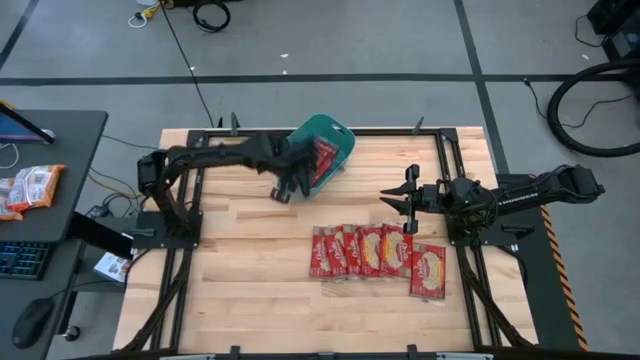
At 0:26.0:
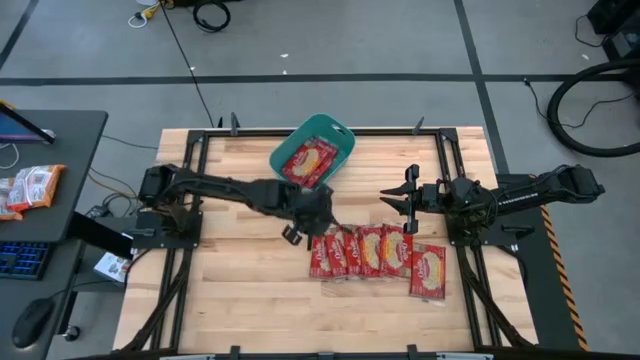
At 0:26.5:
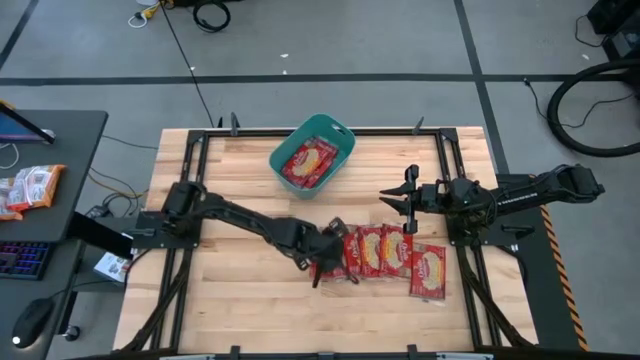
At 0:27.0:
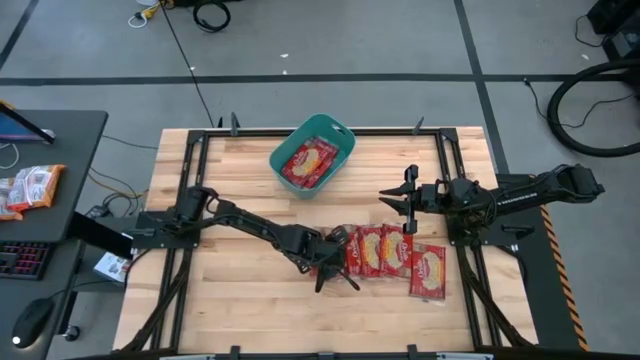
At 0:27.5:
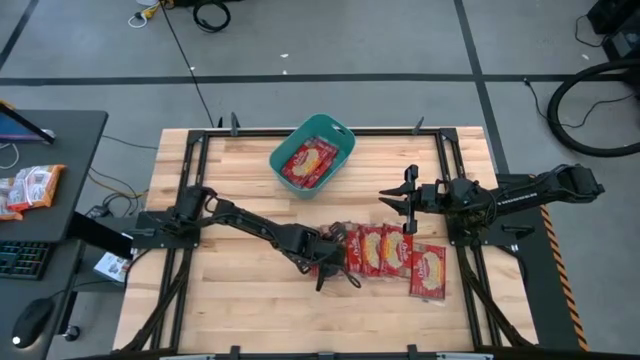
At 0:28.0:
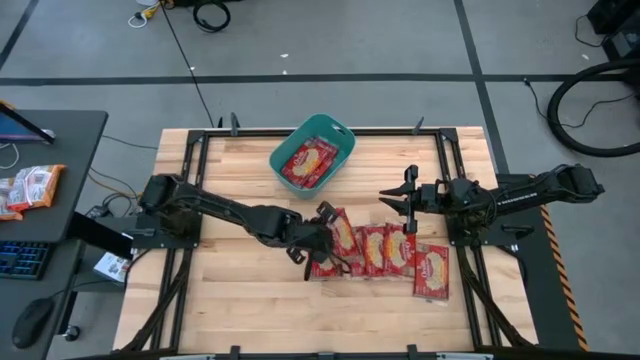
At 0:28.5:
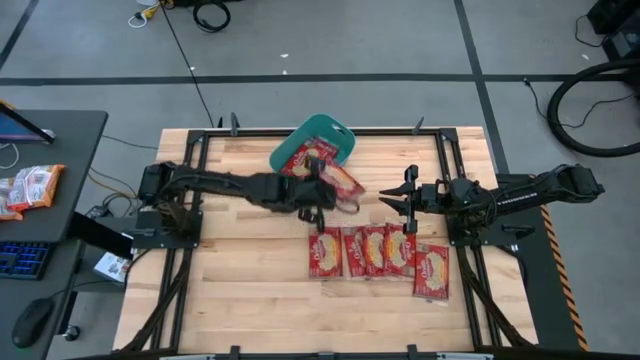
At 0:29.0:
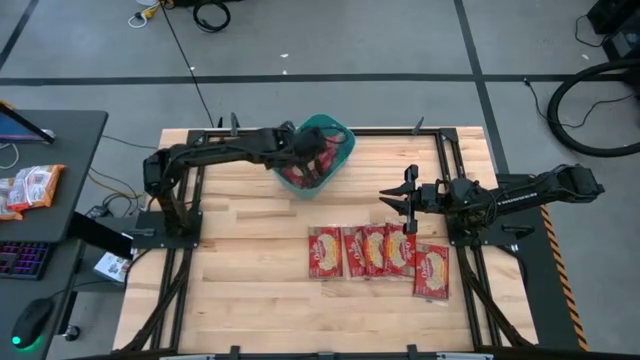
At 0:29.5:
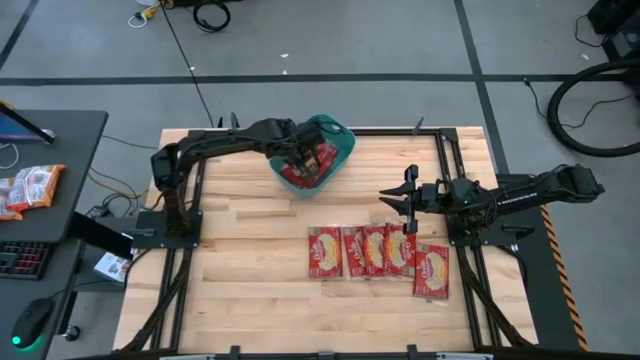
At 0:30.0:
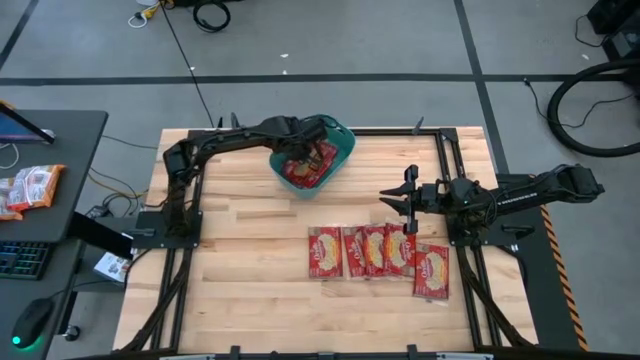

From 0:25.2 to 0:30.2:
Task: Sort popcorn bags into baskets
Put the popcorn bag into the green bin

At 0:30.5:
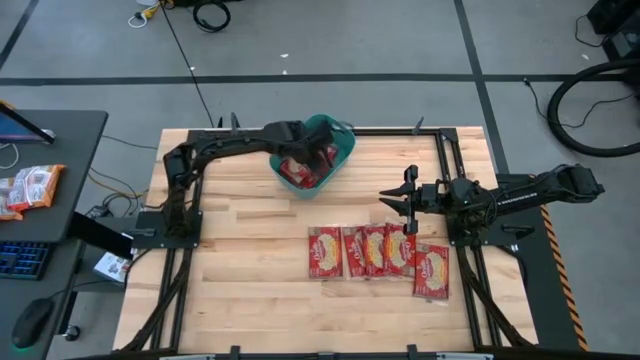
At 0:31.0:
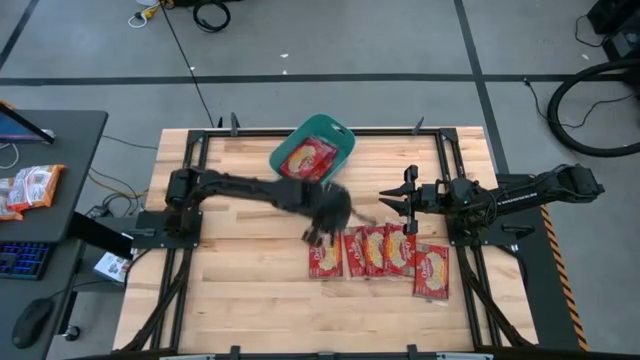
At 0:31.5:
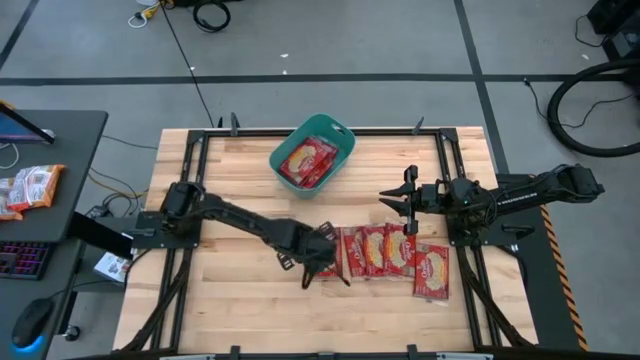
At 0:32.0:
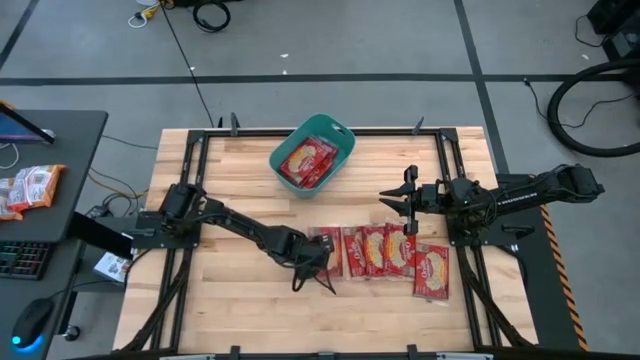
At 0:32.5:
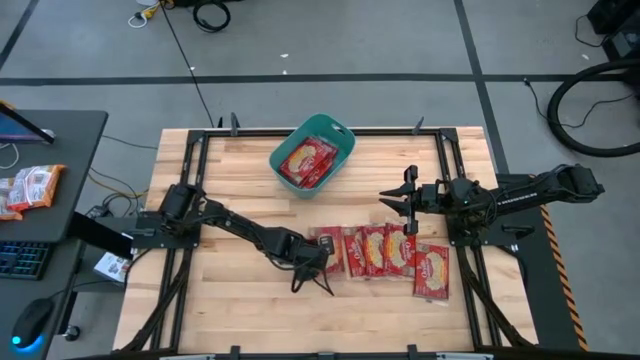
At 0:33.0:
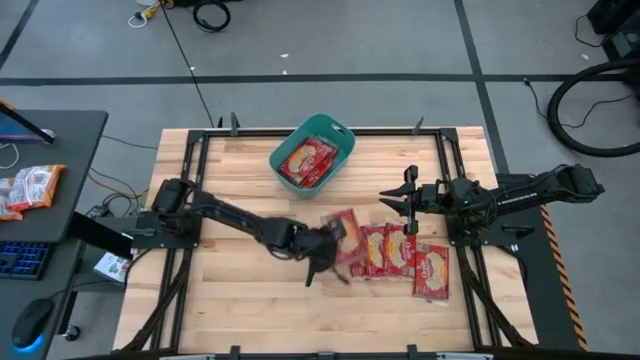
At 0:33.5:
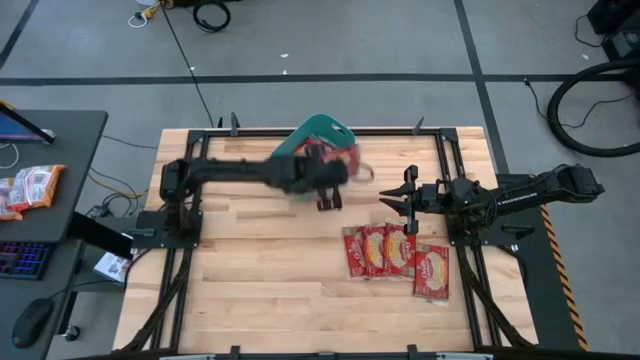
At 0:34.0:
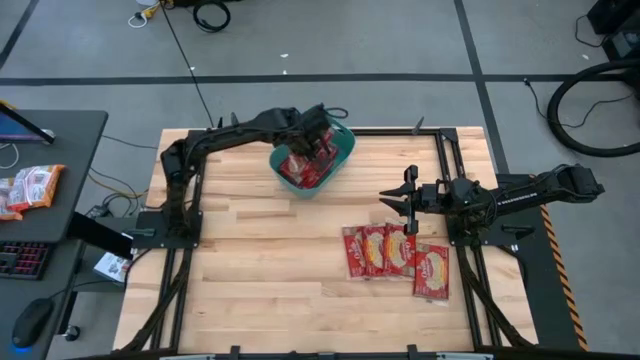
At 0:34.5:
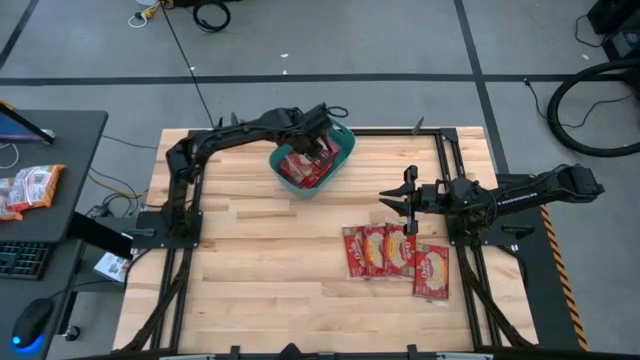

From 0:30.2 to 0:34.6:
Put the popcorn bag into the green bin

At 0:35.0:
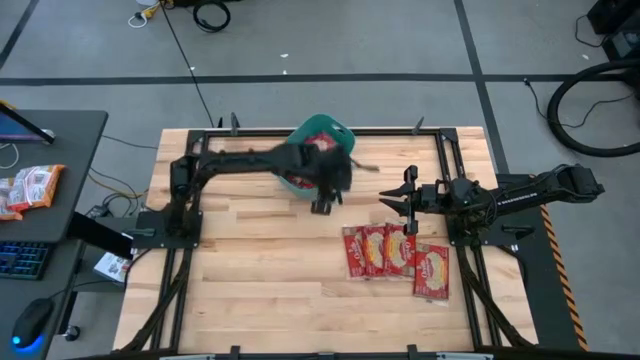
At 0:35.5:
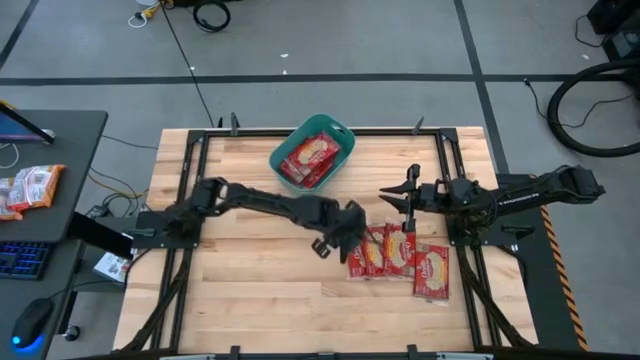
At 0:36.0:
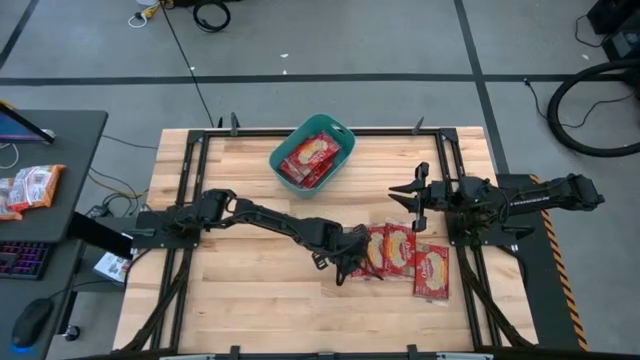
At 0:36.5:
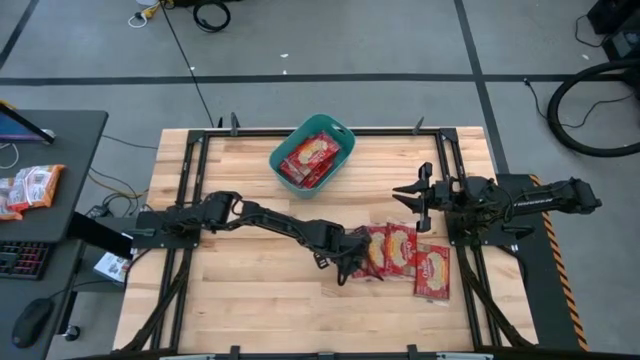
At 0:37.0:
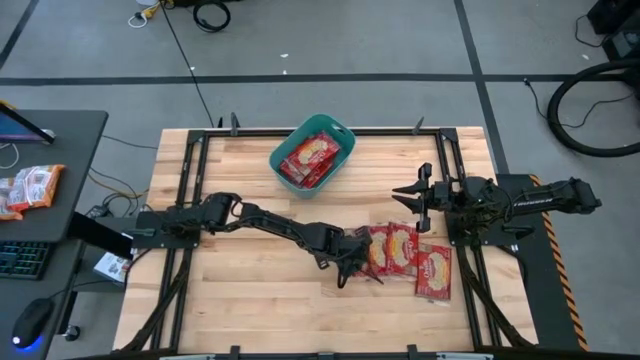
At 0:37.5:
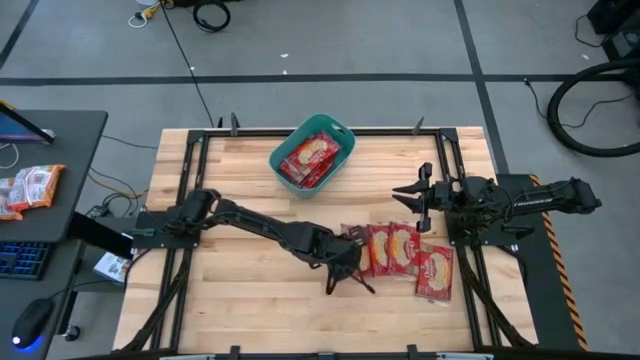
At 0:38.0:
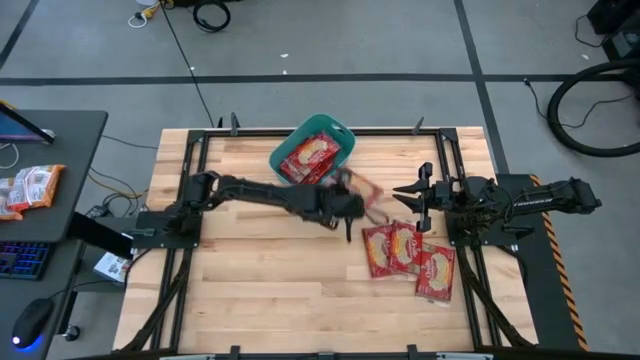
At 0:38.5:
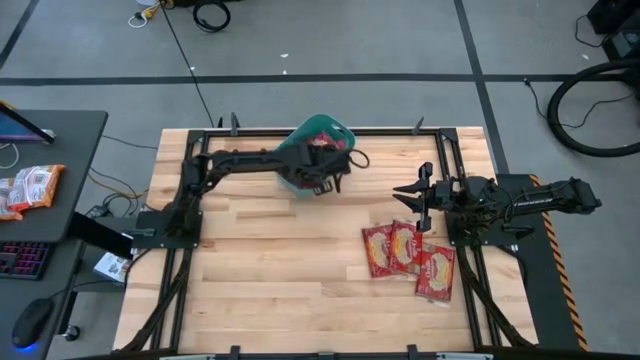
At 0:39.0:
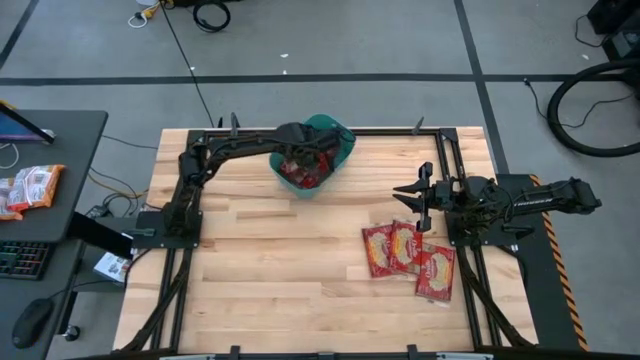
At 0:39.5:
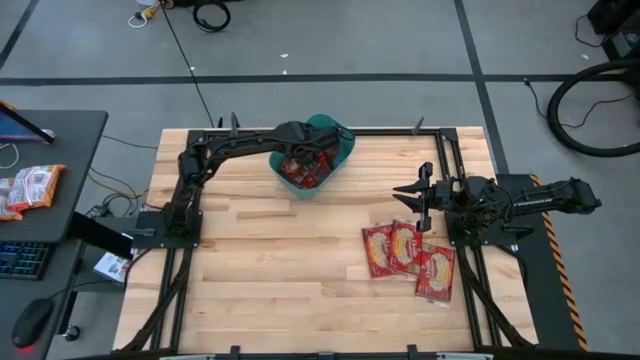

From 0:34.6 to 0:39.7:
Put the popcorn bag into the green bin

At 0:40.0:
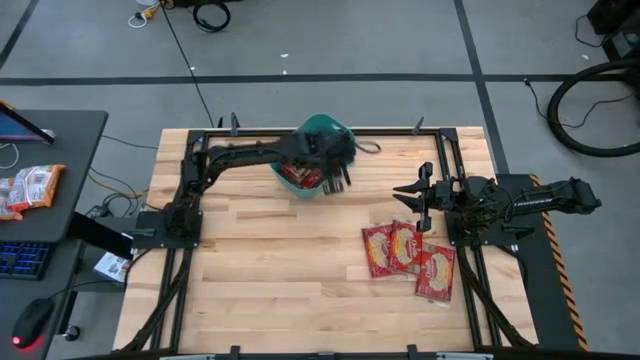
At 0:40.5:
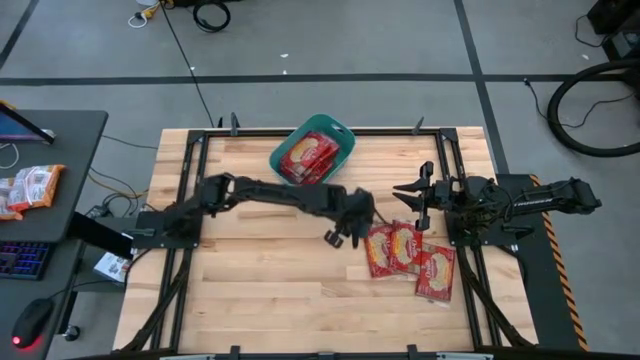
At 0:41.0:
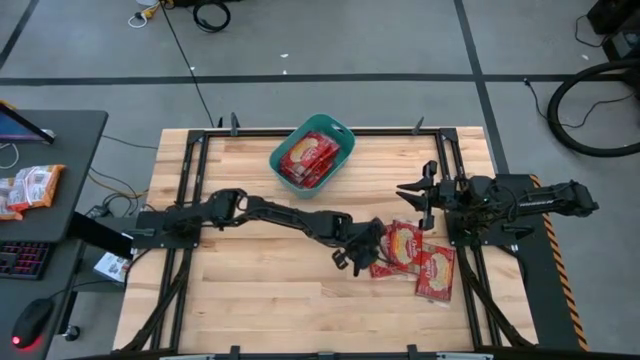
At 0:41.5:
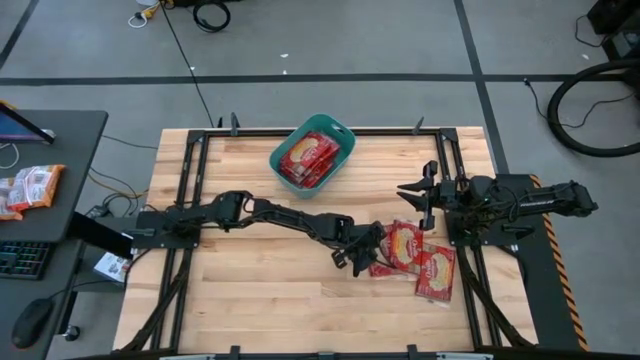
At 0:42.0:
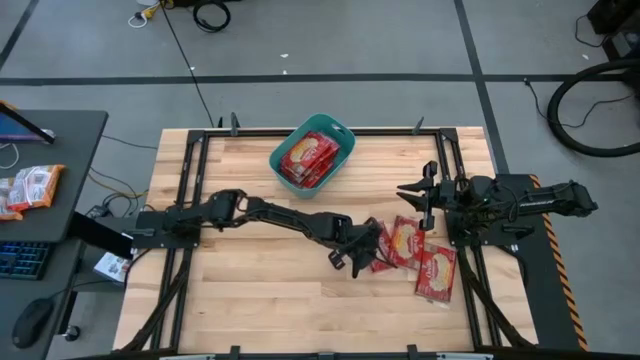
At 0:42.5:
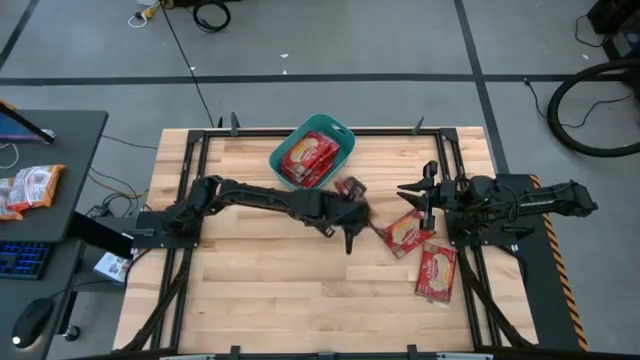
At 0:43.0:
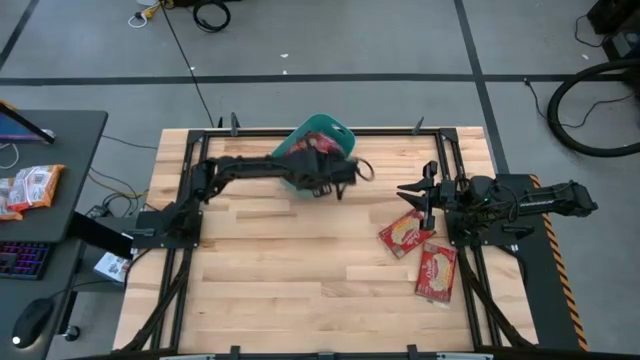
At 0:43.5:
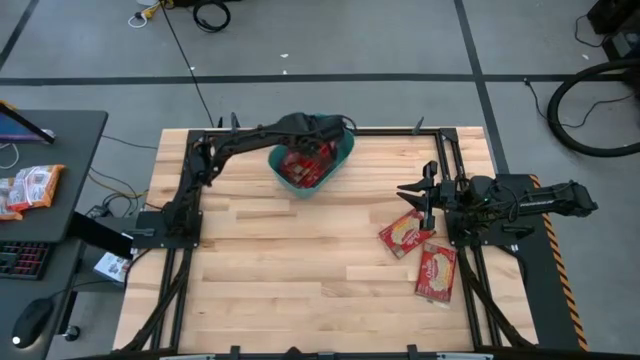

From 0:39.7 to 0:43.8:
Put the popcorn bag into the green bin

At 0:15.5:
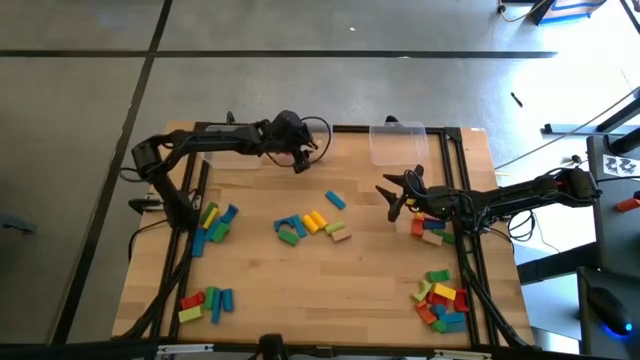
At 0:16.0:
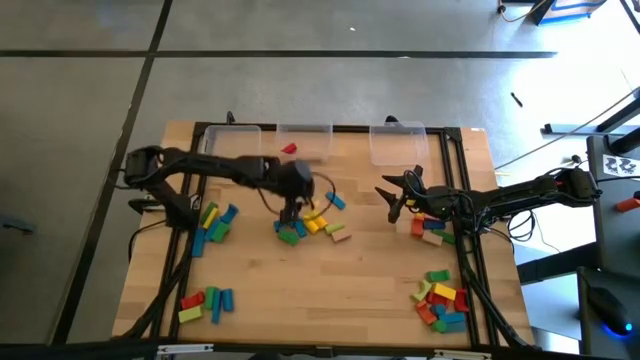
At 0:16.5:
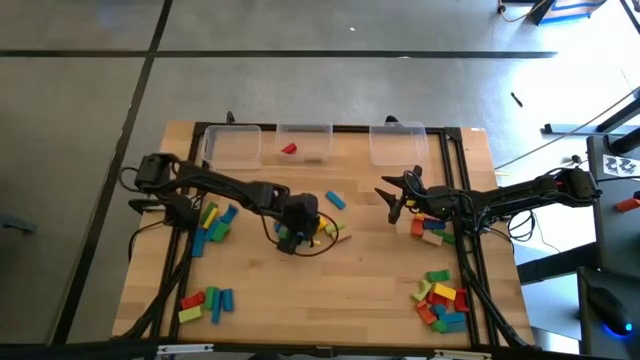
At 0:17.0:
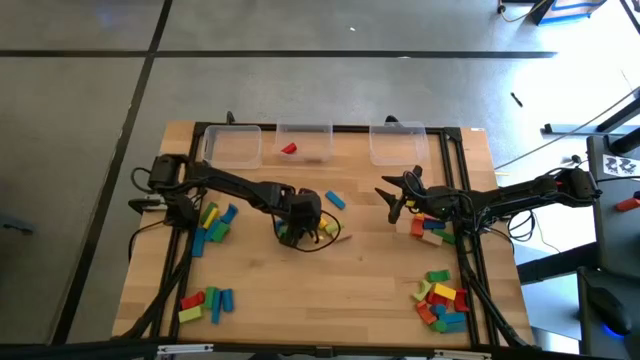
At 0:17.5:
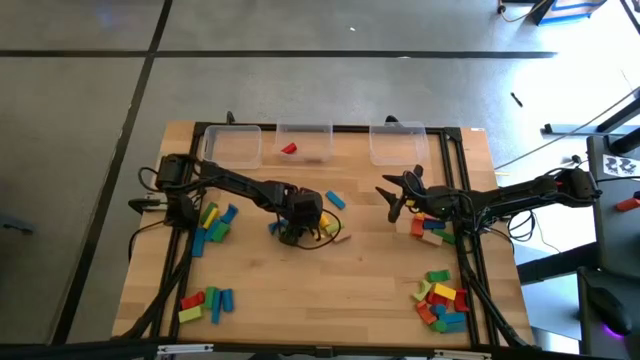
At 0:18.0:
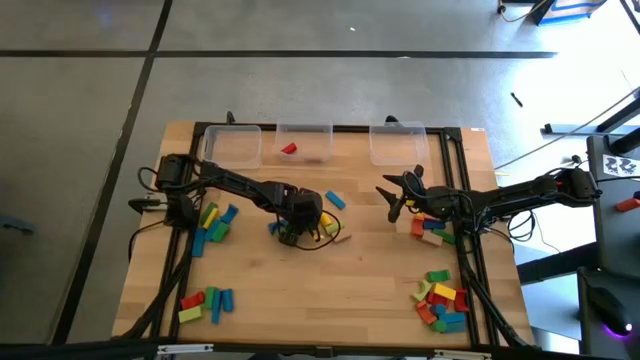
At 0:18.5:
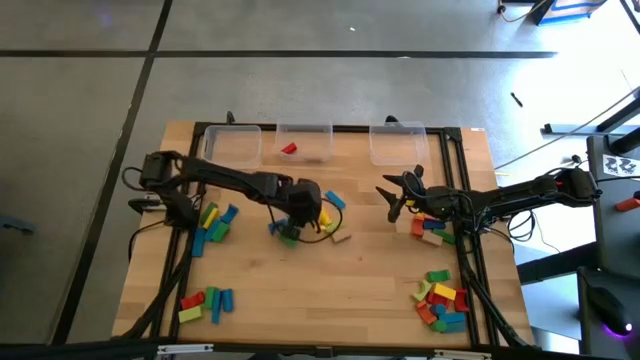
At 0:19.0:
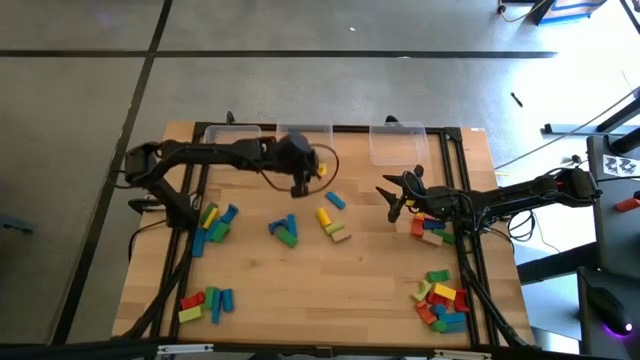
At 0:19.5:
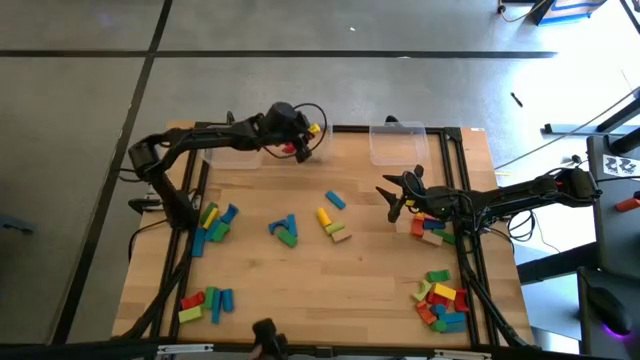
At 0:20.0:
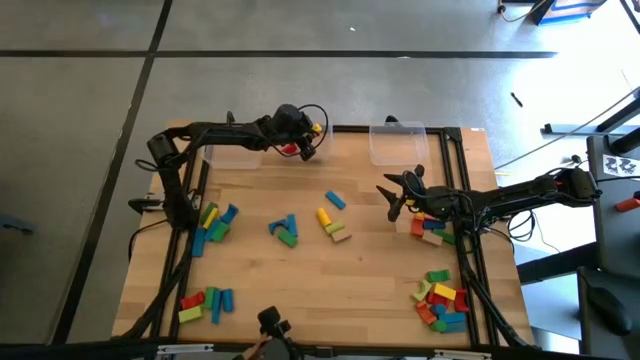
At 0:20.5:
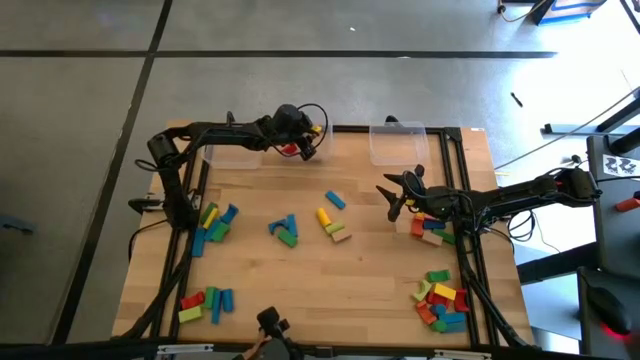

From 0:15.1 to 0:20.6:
Task: Sort blocks by size
Put the yellow cylindrical block into the middle transparent bin
